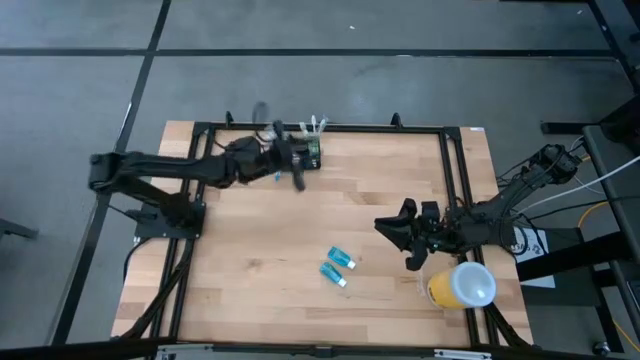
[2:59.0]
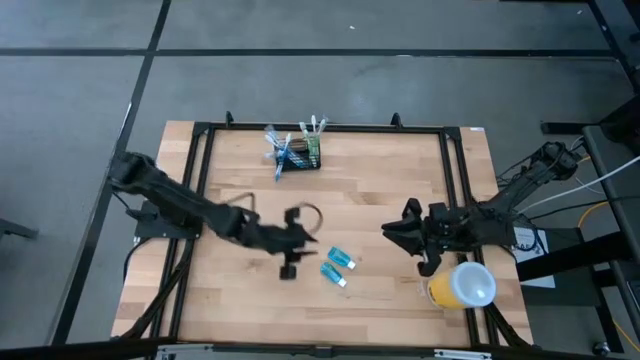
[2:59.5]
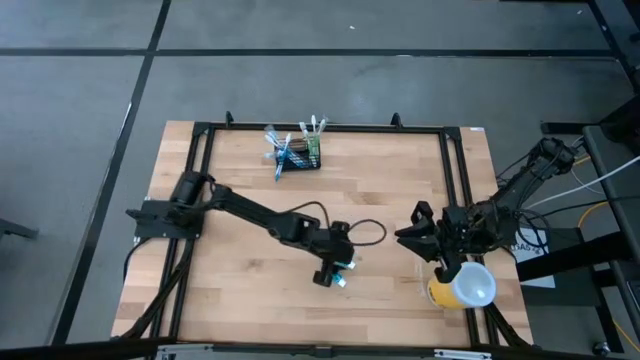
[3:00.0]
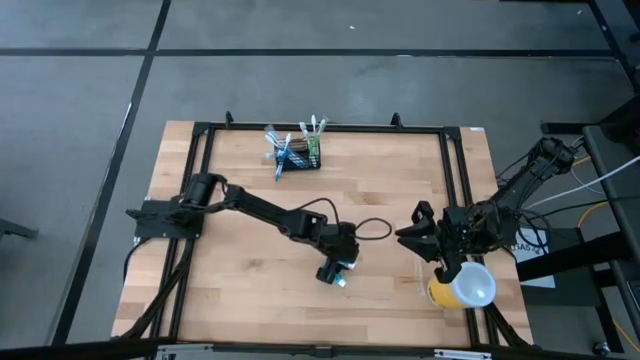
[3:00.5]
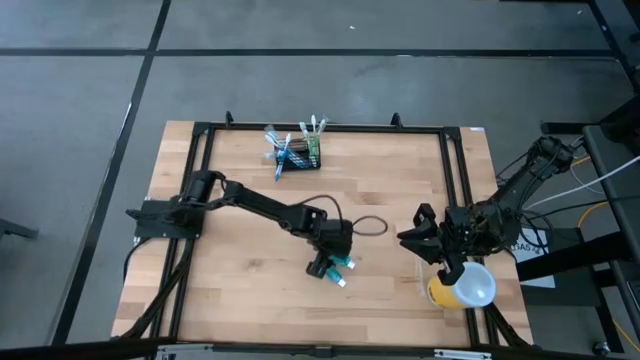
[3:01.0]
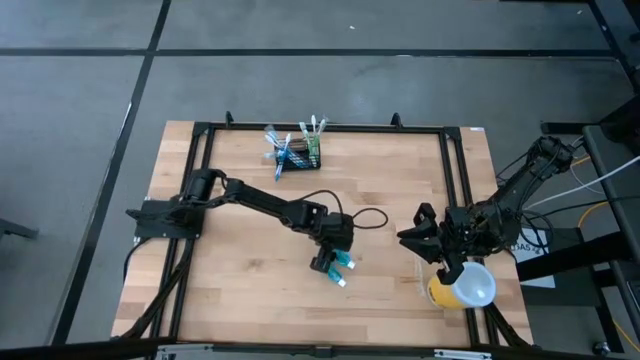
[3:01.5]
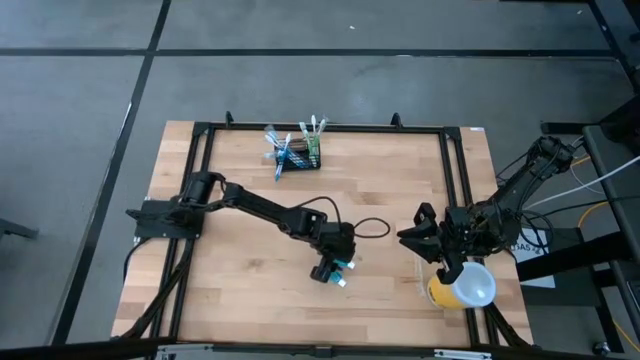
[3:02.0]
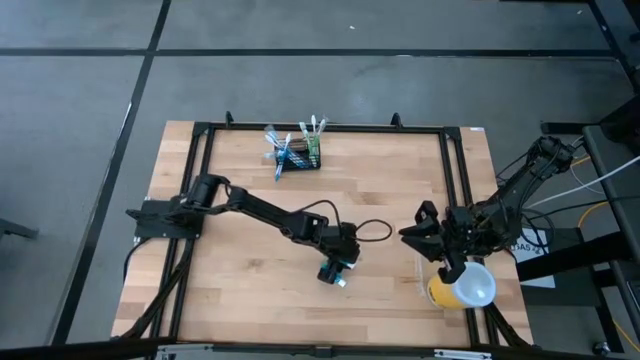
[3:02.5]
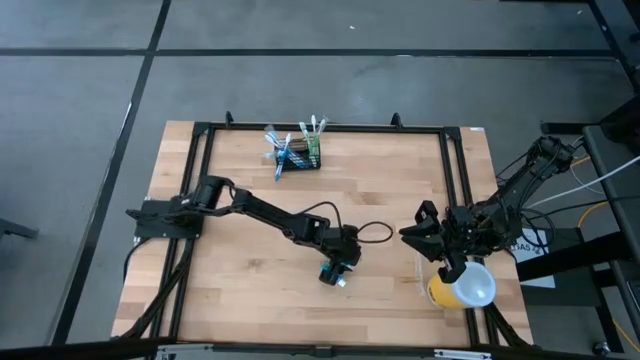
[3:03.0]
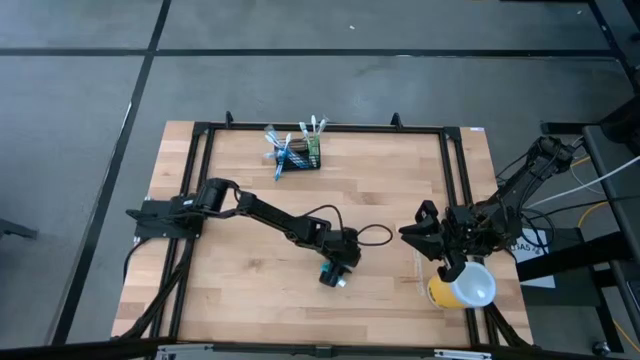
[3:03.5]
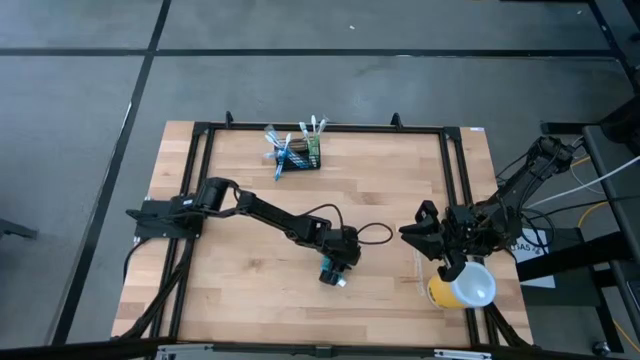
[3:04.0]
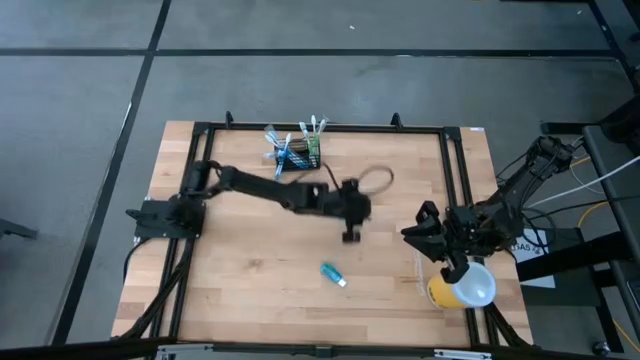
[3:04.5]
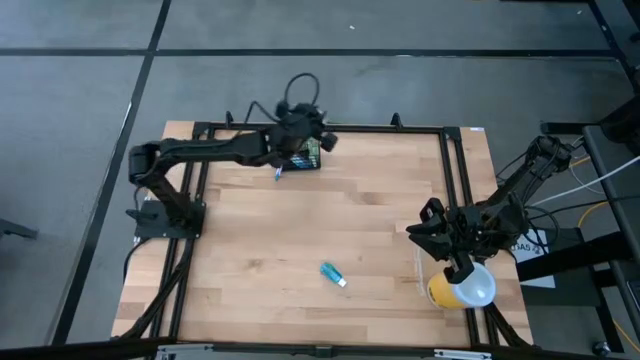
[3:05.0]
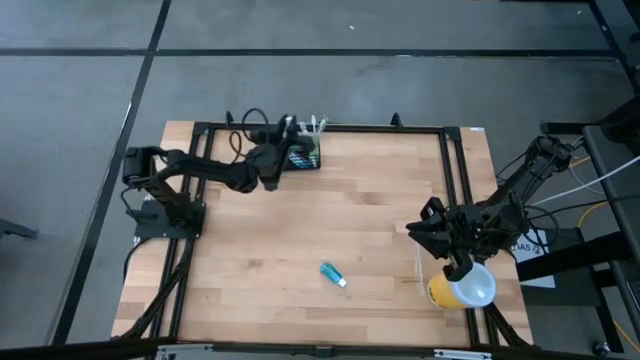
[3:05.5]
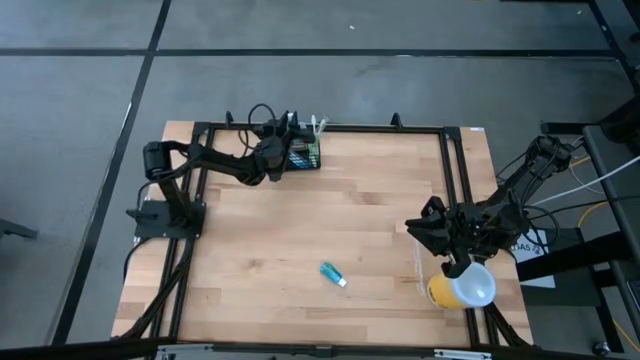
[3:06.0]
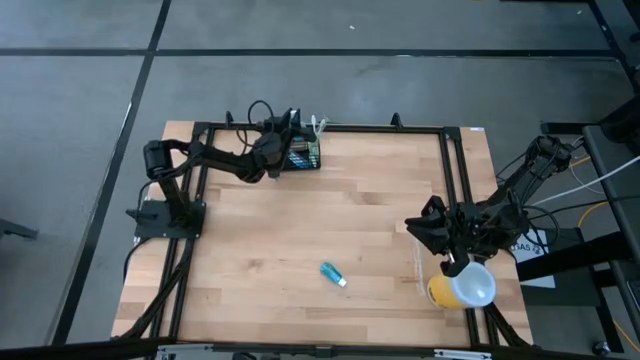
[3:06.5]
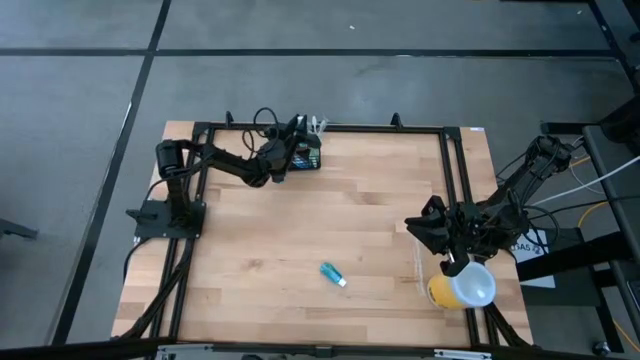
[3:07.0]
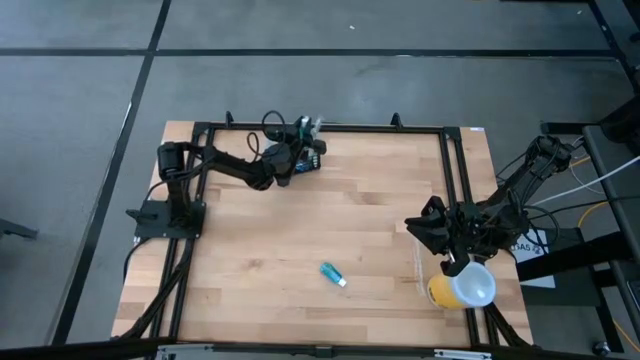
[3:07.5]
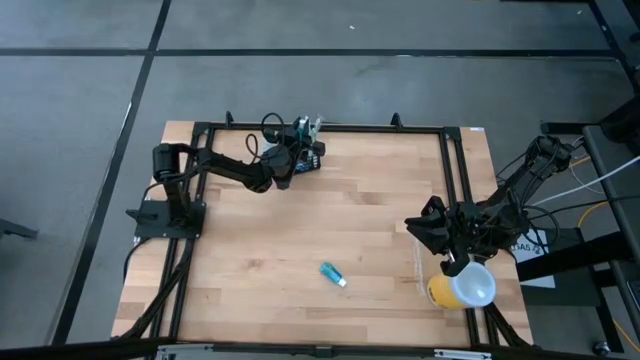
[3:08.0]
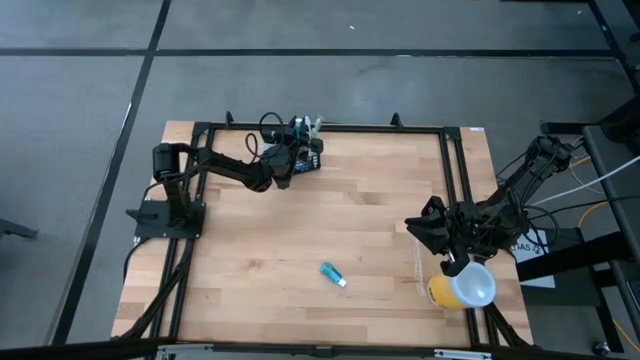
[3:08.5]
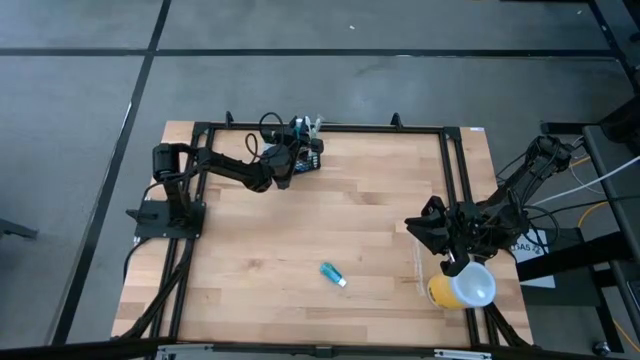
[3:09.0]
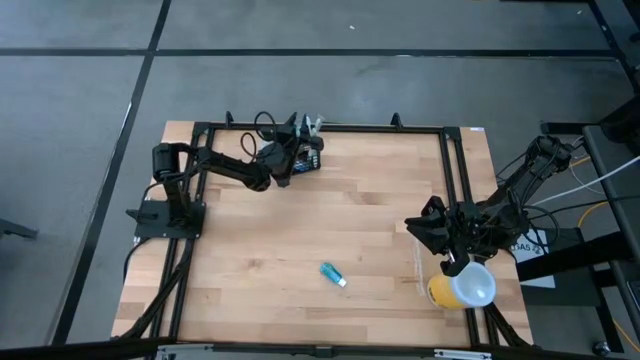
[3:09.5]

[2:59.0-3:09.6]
Task: Pick & Place toothbrushing station
Put the top mouthwash bottle into the wire organizer

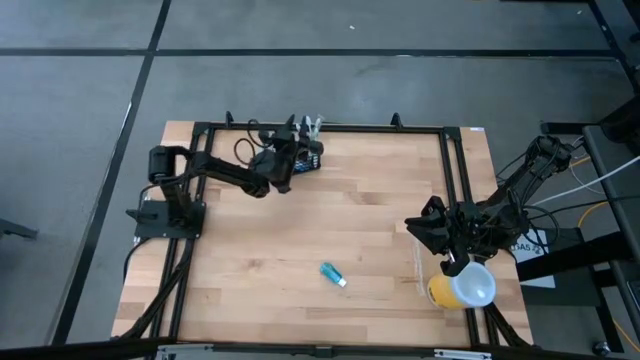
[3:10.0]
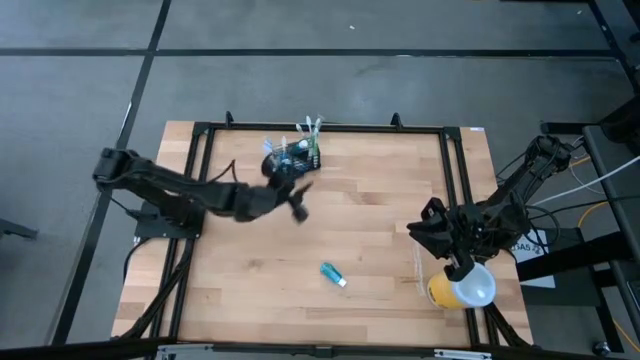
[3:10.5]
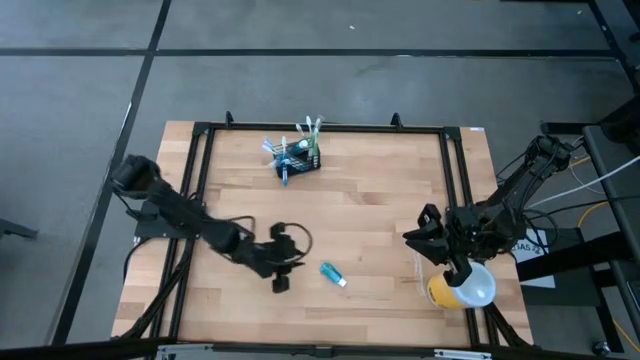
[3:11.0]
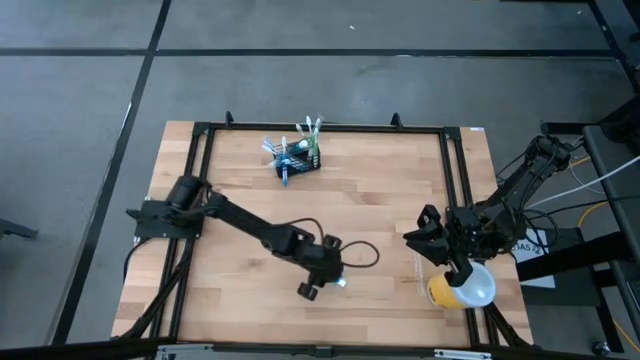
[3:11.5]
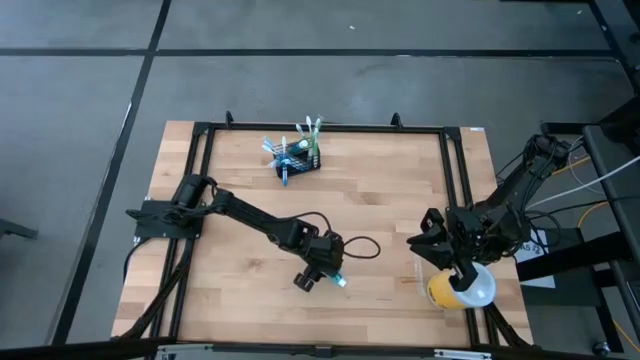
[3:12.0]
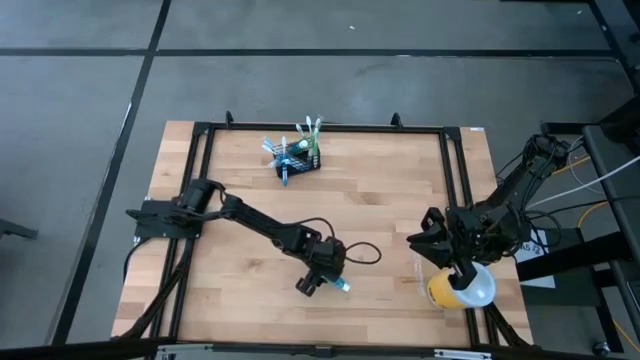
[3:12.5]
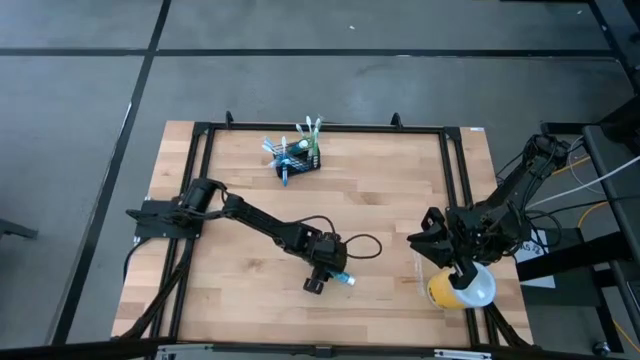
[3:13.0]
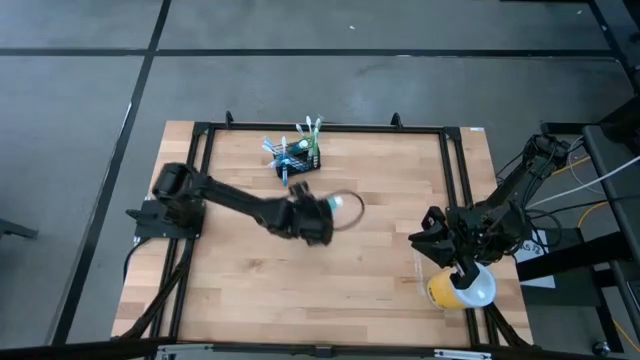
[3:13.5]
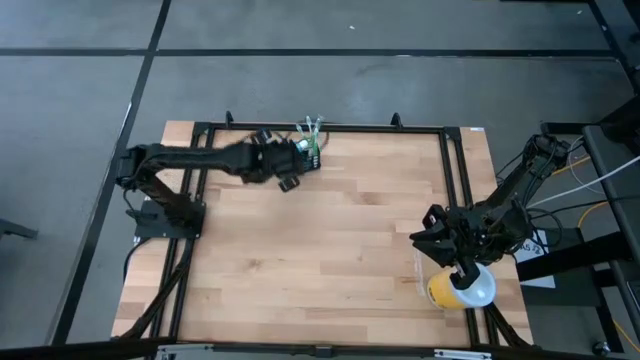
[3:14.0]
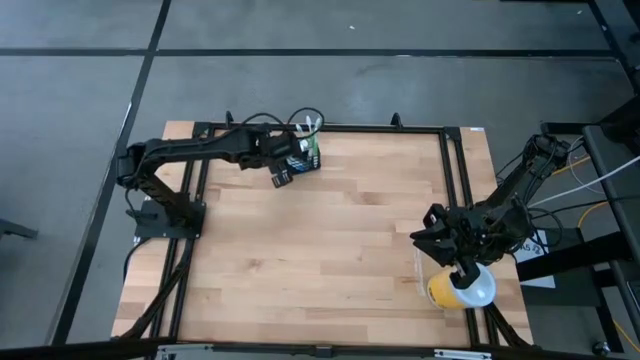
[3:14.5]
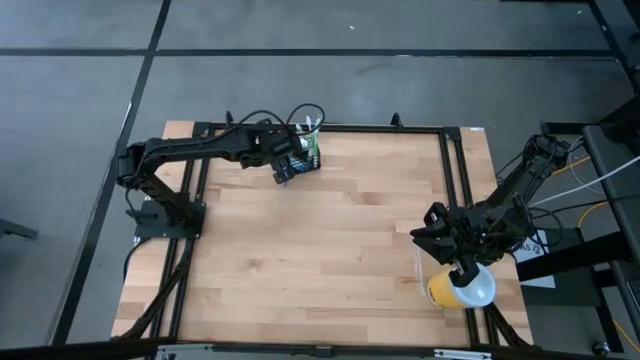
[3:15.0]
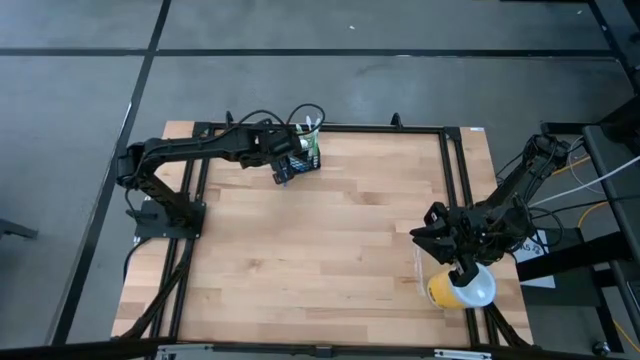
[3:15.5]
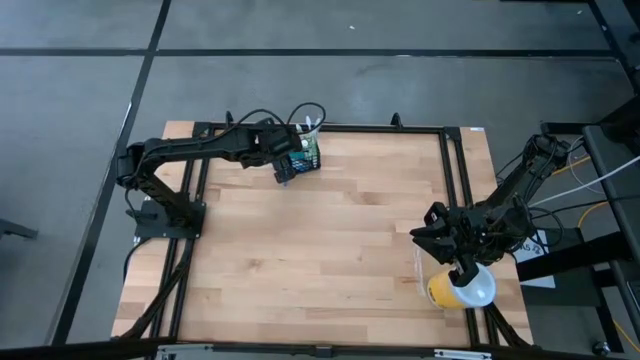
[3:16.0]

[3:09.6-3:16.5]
Put the mouthwash bottle into the wire organizer
